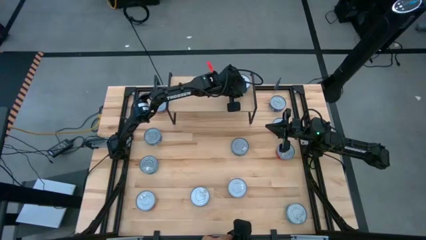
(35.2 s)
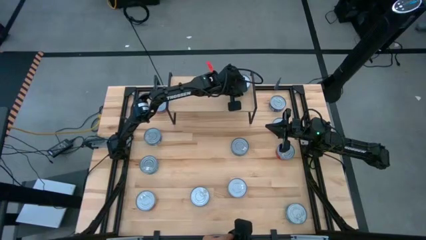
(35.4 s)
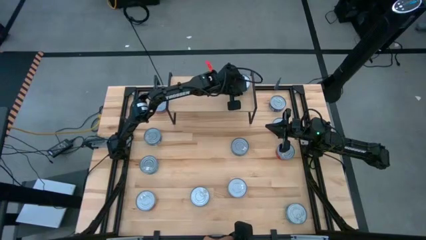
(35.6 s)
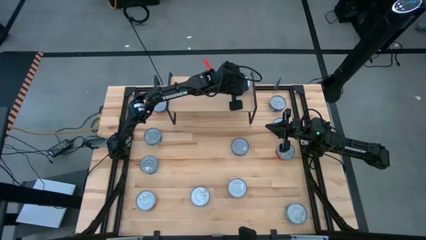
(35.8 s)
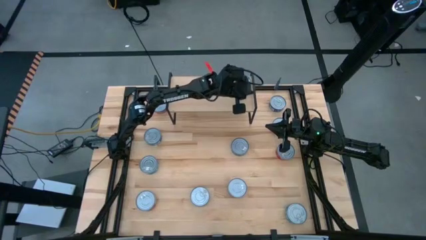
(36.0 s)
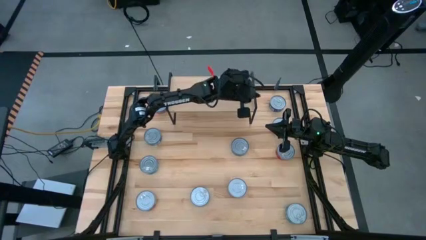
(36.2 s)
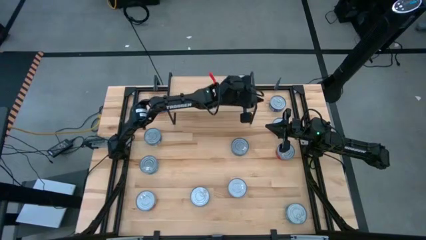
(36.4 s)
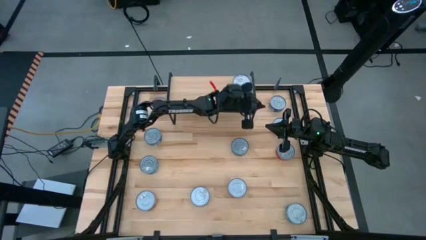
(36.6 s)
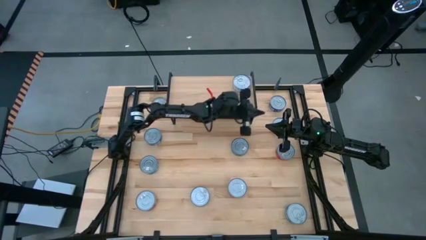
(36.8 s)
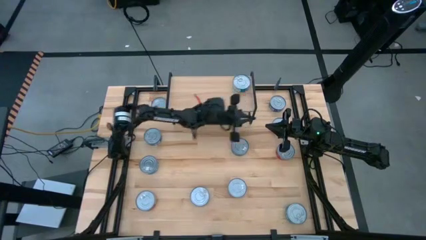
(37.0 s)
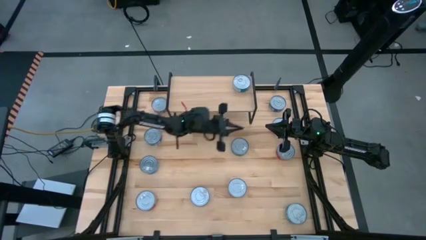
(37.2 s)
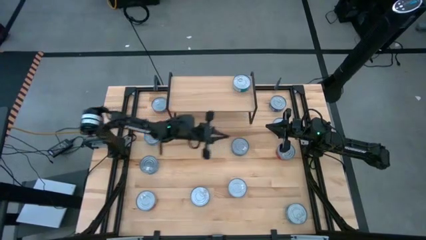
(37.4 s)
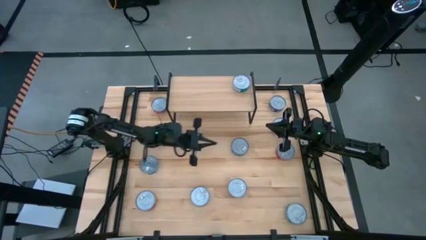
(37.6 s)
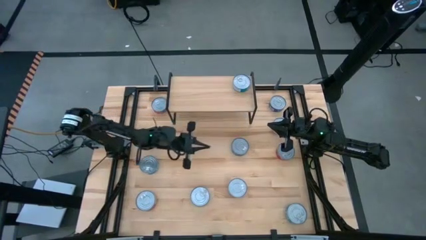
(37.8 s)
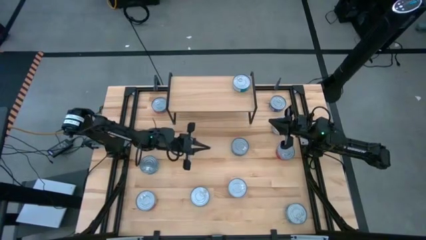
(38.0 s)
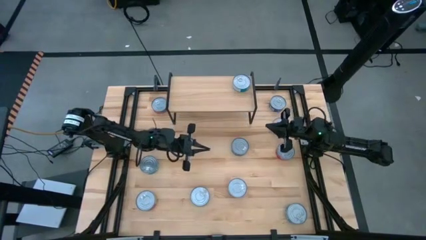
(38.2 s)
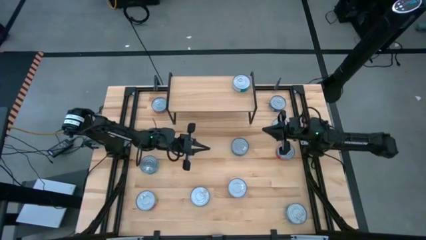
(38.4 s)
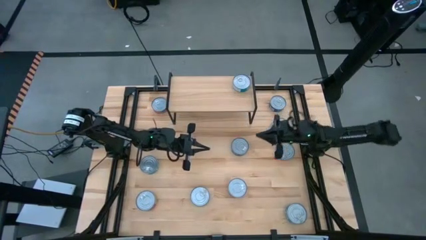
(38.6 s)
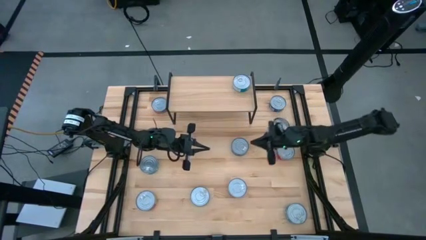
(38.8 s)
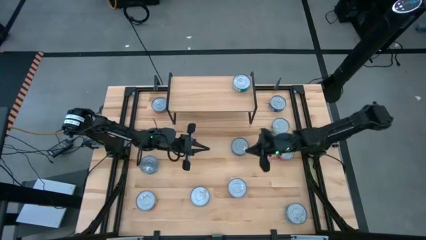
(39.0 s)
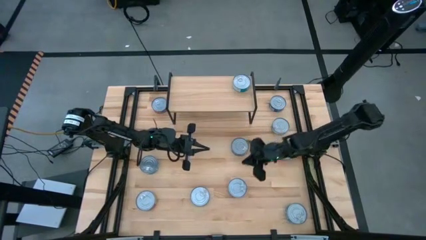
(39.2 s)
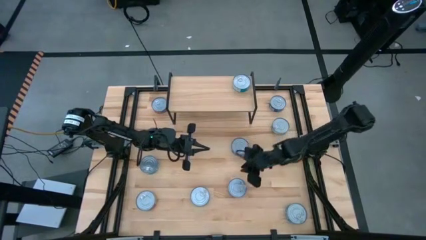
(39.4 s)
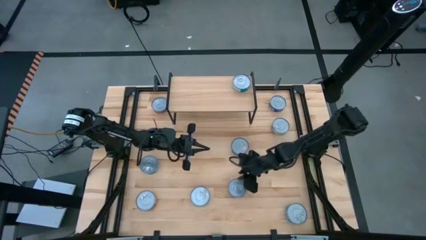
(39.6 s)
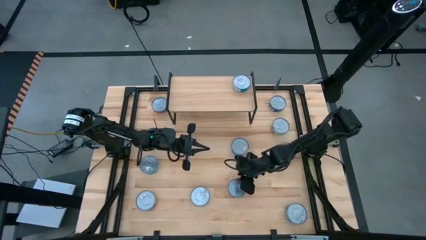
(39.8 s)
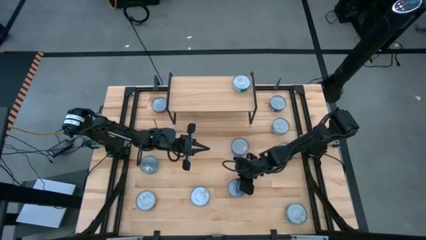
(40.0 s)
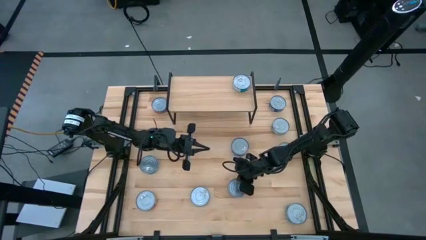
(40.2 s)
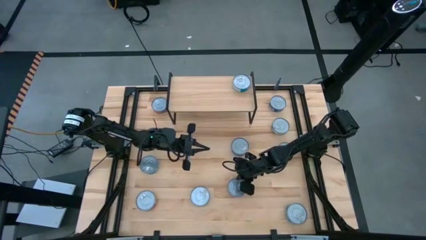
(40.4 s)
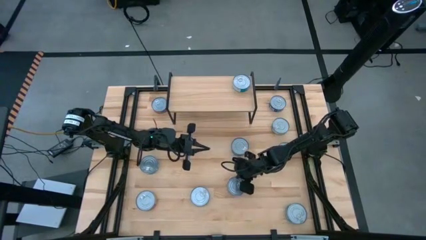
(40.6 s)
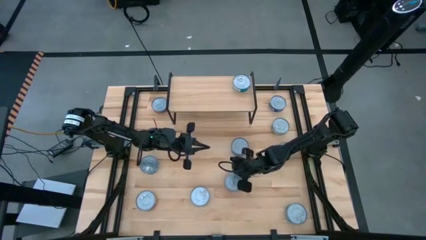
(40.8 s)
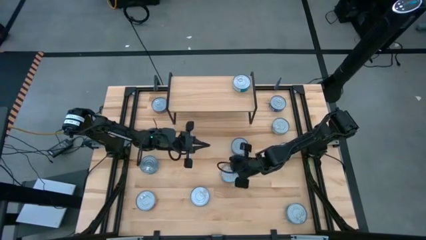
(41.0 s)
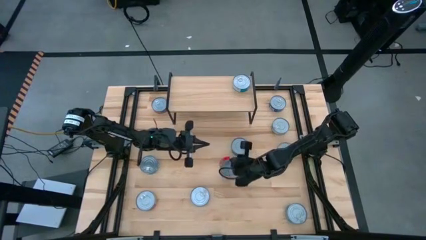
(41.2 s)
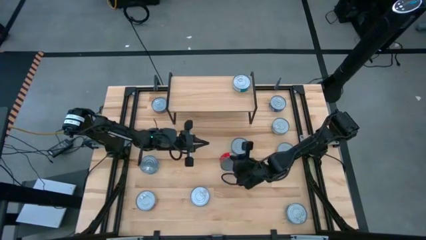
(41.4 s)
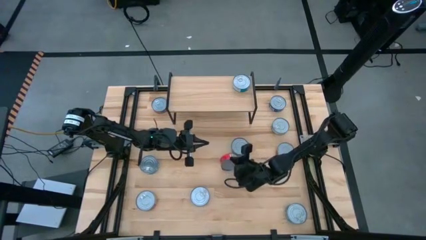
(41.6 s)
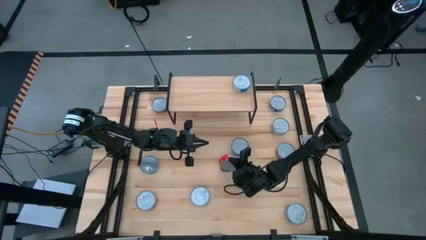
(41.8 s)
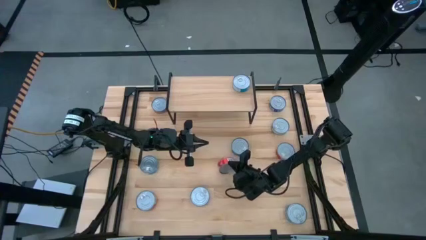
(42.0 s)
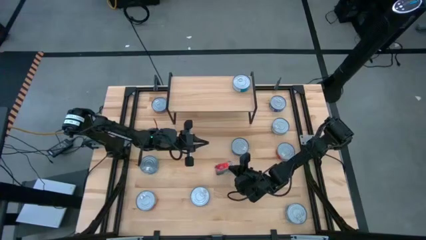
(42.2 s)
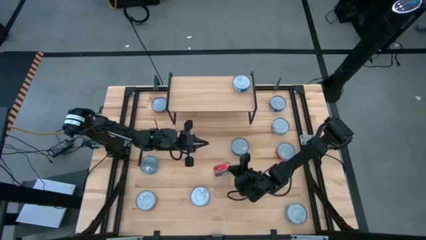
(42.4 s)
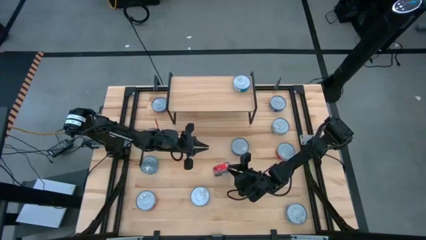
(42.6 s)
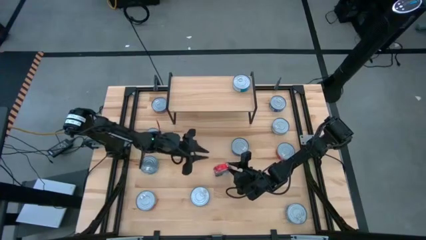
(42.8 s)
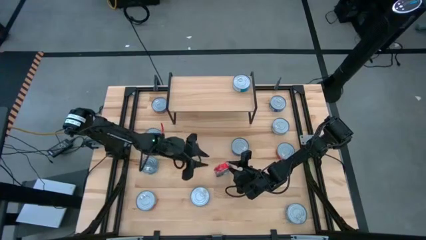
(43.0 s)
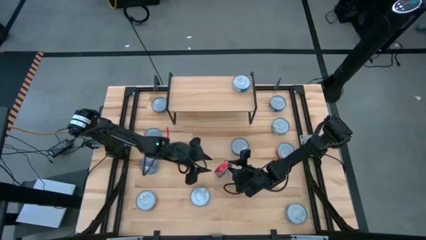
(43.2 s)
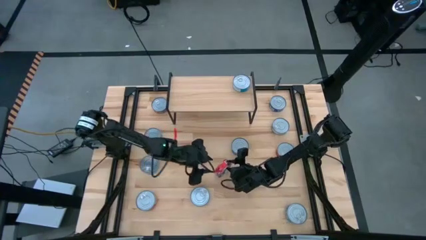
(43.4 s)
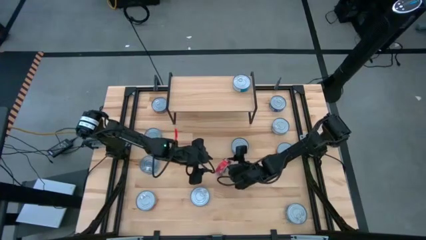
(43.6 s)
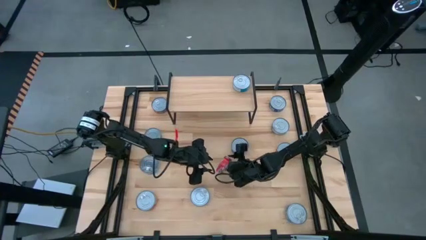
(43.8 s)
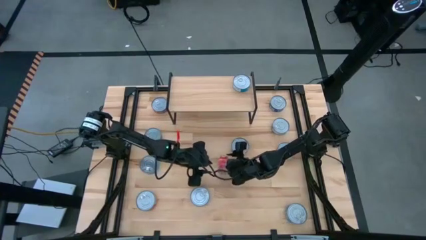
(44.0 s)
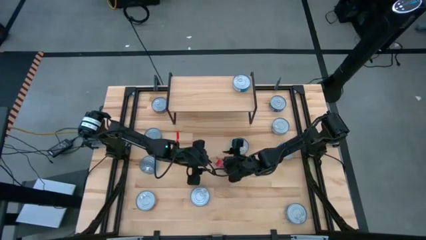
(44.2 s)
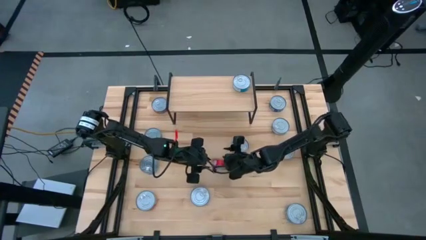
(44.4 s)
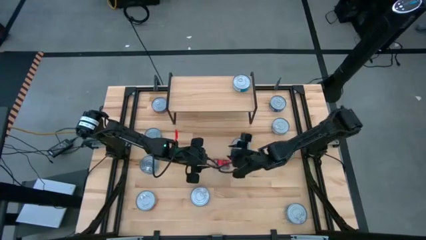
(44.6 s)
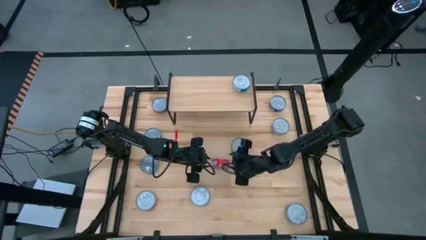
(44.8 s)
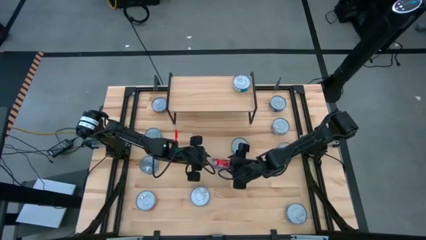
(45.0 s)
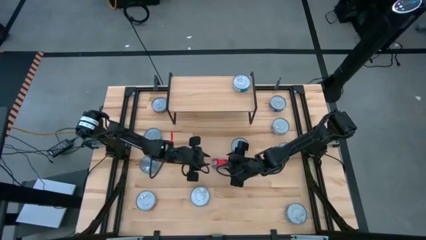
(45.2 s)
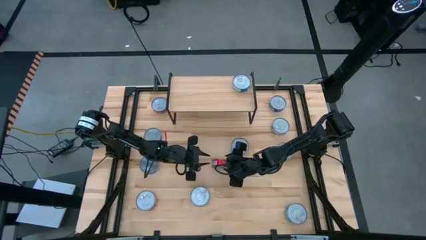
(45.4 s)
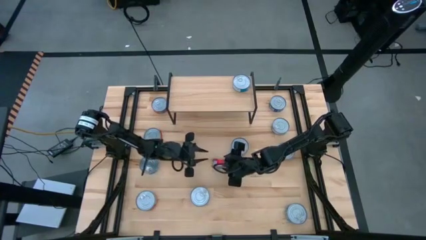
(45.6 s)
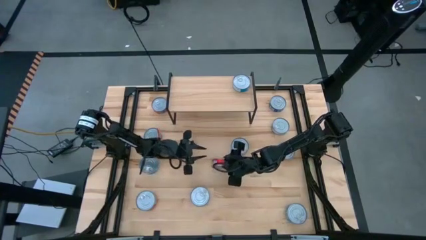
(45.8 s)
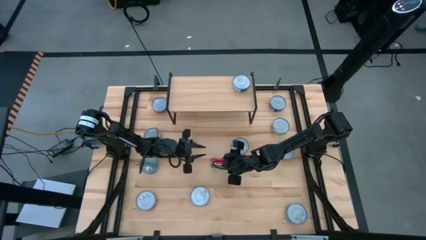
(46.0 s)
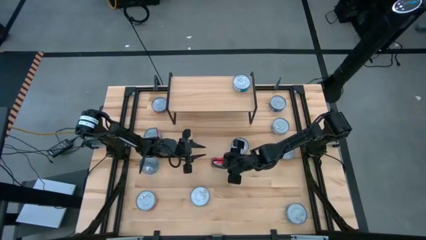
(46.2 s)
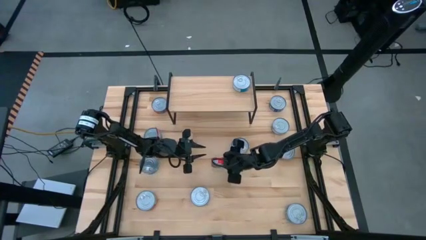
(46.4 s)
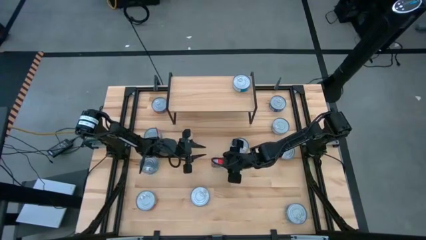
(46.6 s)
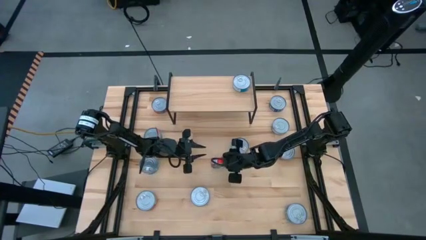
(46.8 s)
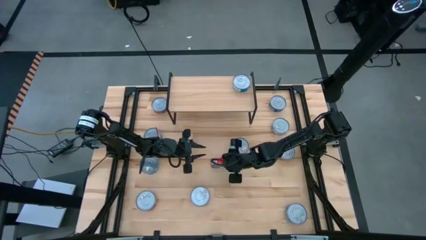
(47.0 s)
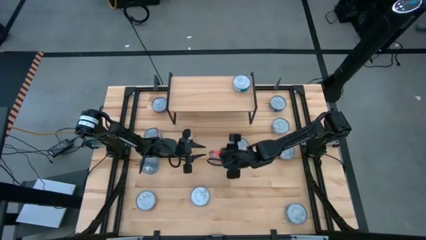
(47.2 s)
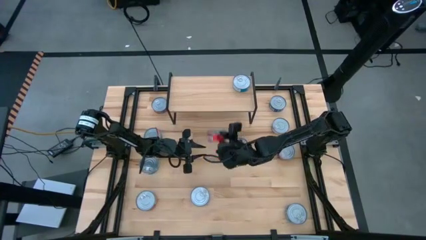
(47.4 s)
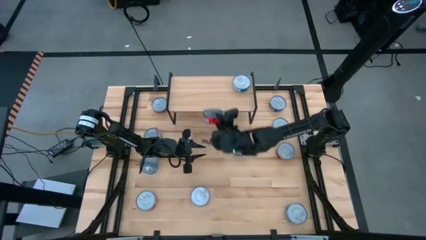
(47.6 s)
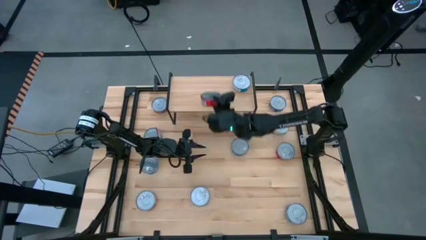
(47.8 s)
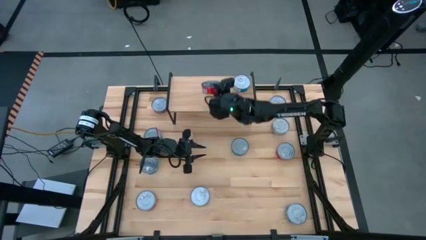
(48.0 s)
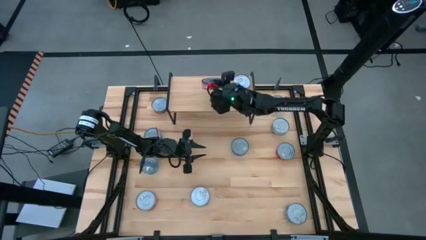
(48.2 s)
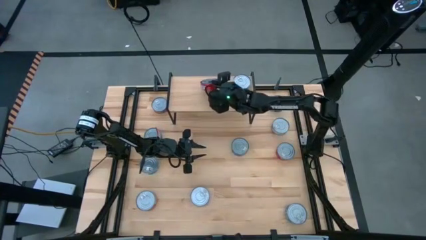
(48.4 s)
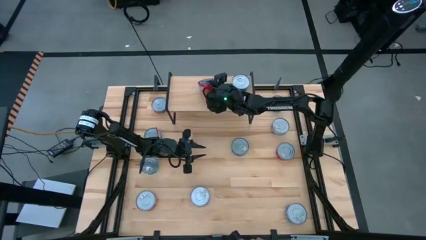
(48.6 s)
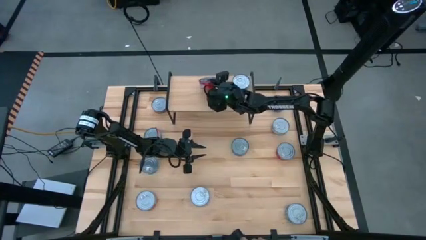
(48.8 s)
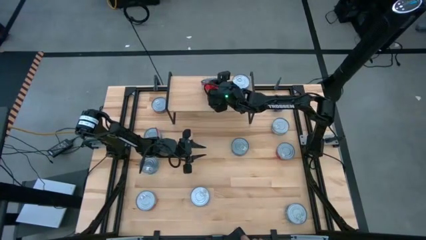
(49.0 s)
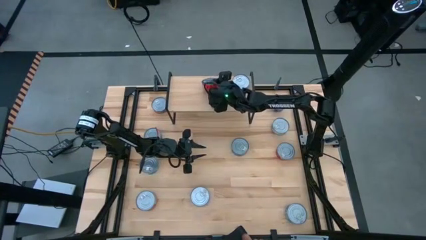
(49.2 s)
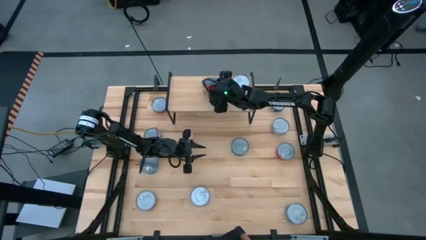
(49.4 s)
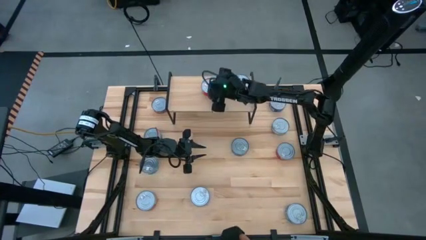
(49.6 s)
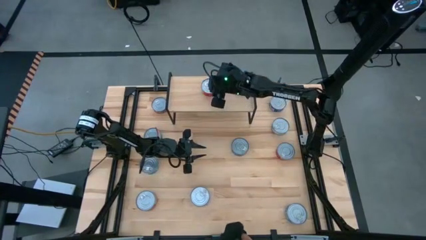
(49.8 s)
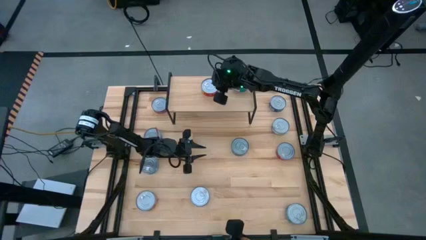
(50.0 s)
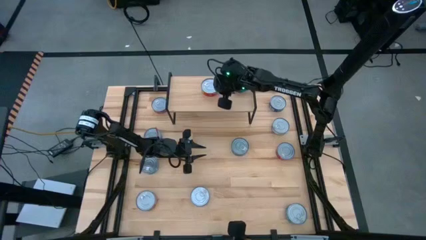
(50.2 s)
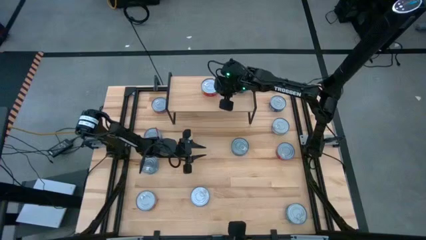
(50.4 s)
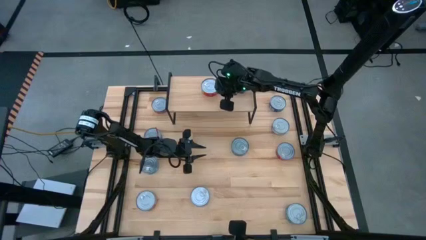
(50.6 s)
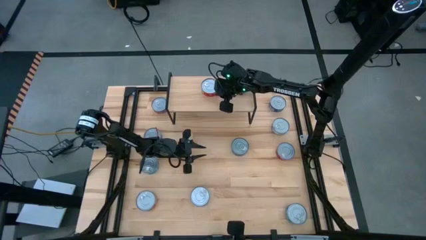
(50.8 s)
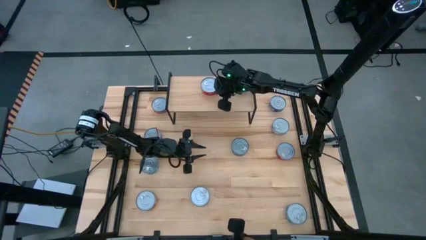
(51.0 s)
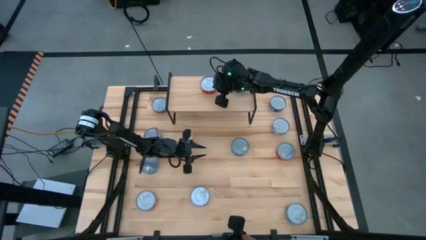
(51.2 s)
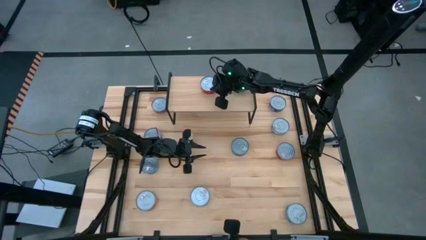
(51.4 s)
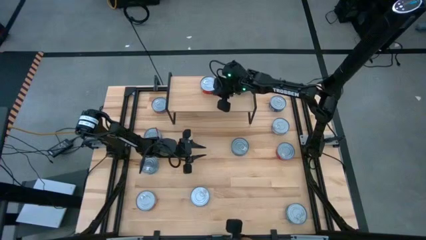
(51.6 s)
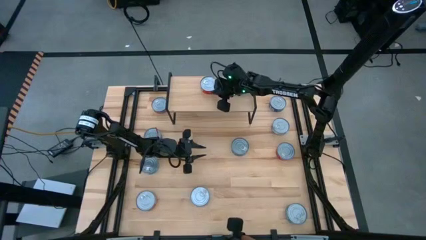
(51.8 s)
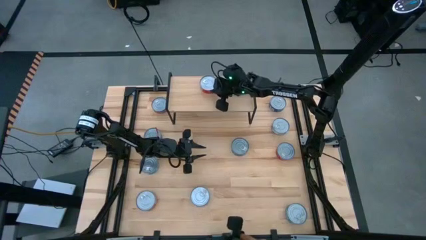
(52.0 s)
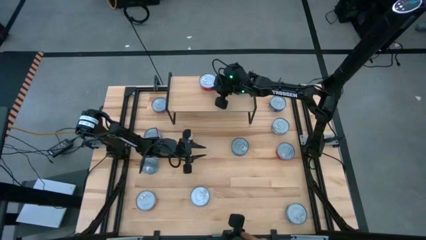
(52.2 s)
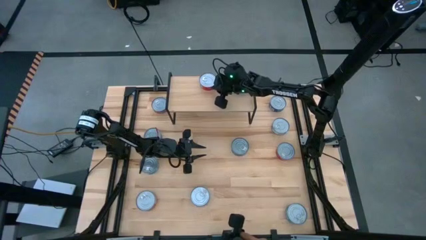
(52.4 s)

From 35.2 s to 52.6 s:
Task: Stack canned seafood by type on shelf
Put the red tuna can on the shelf
